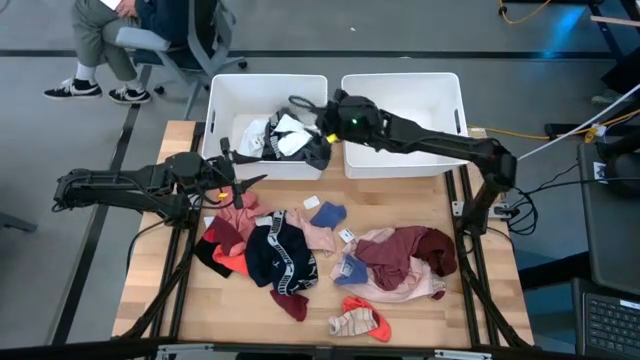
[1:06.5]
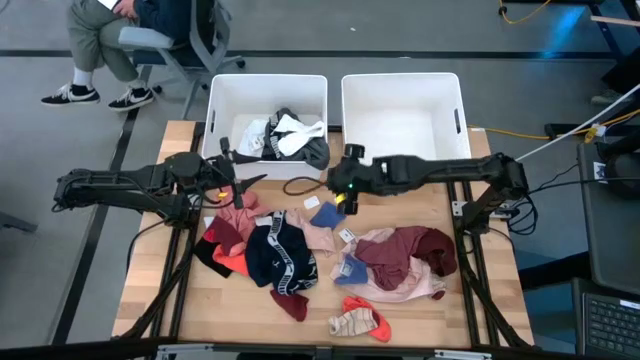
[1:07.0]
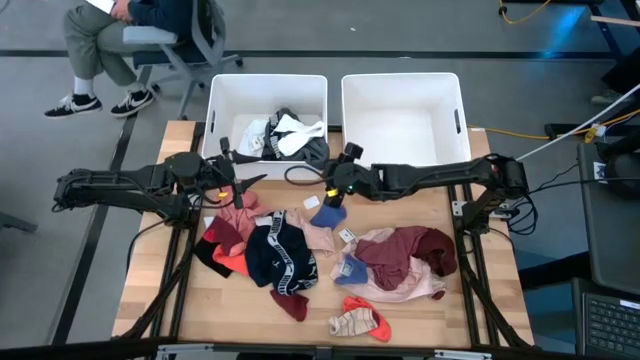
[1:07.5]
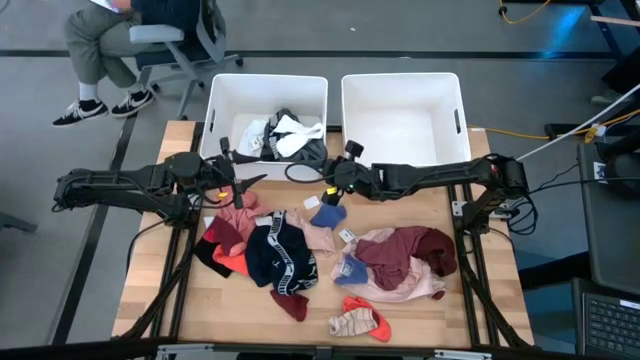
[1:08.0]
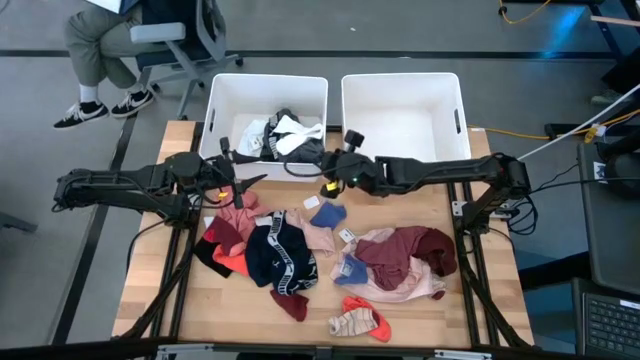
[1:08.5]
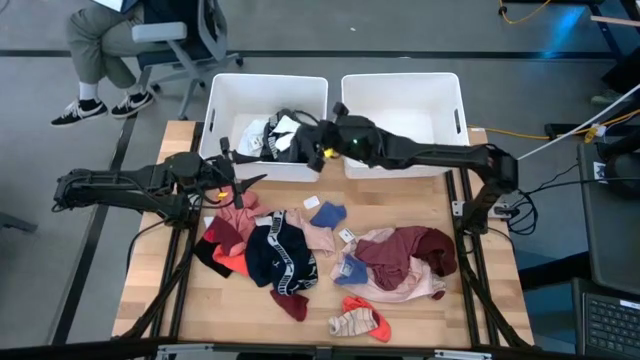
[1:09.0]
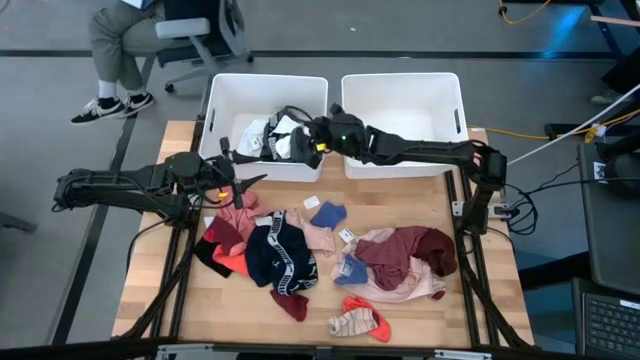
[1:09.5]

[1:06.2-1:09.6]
Task: Sort clothes
Adjust the gray boxer in the left white laundry bin

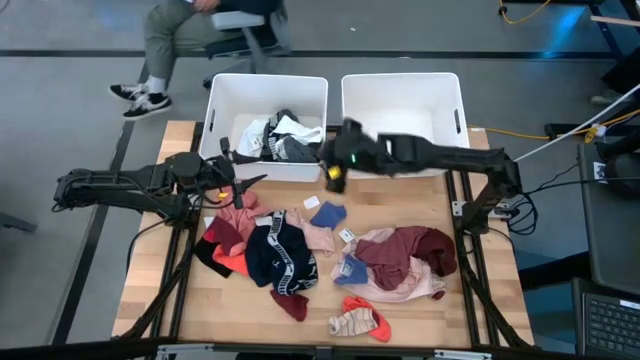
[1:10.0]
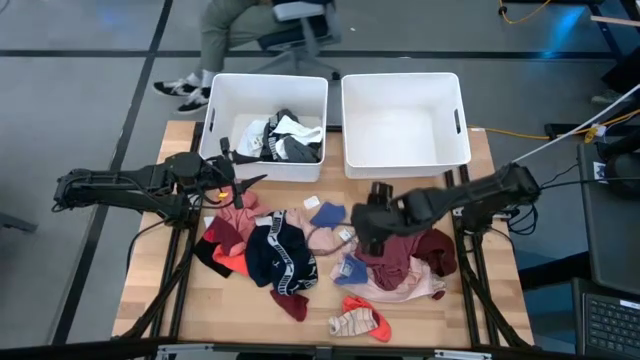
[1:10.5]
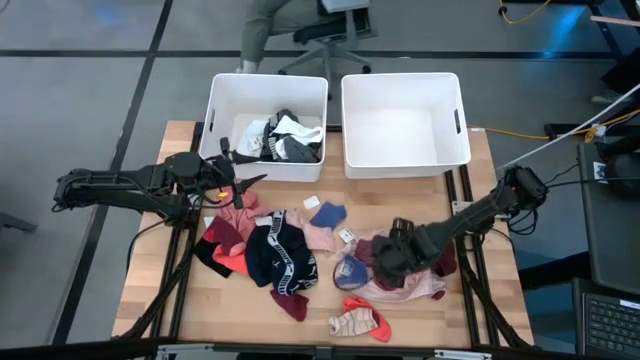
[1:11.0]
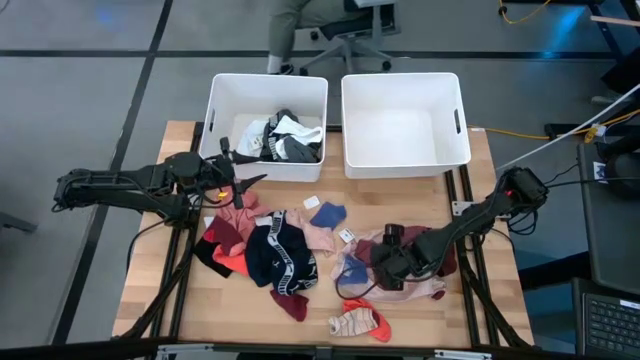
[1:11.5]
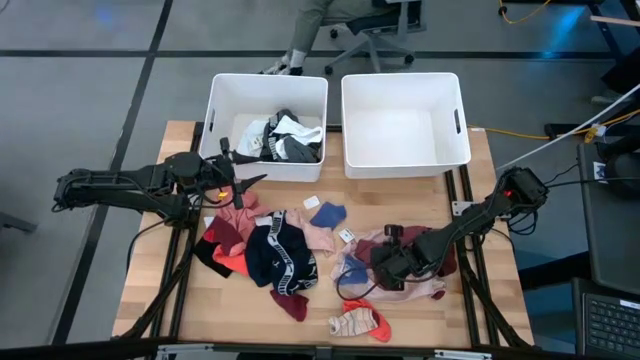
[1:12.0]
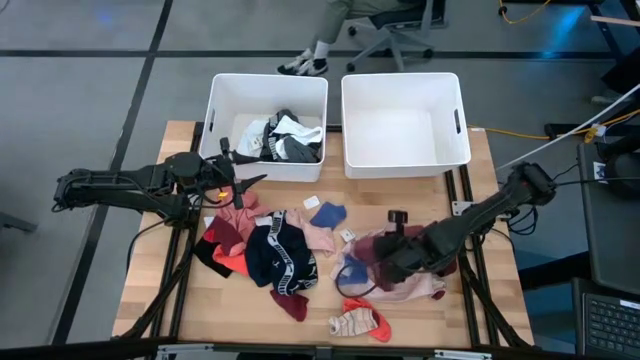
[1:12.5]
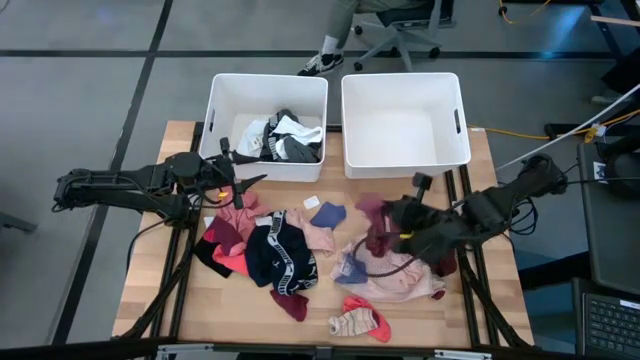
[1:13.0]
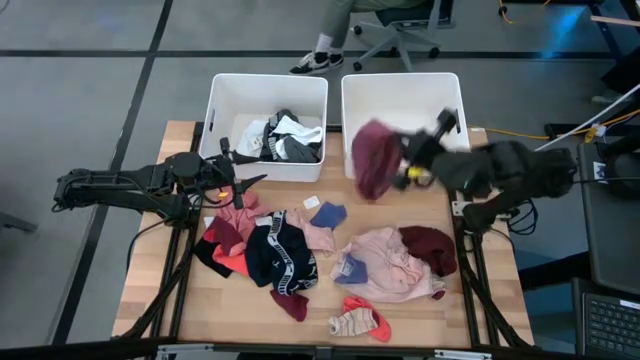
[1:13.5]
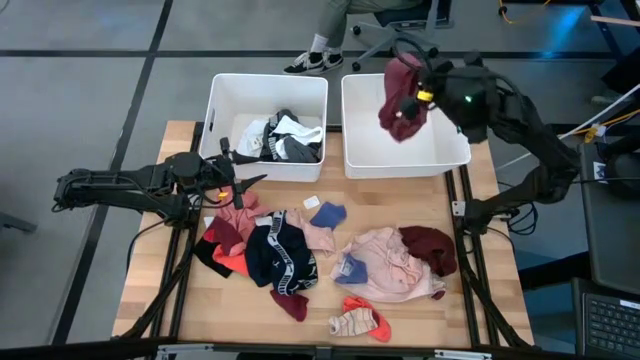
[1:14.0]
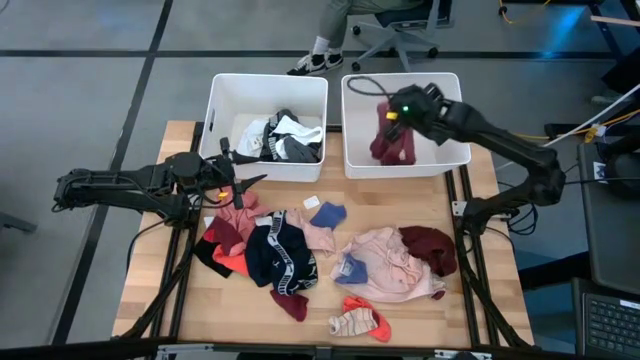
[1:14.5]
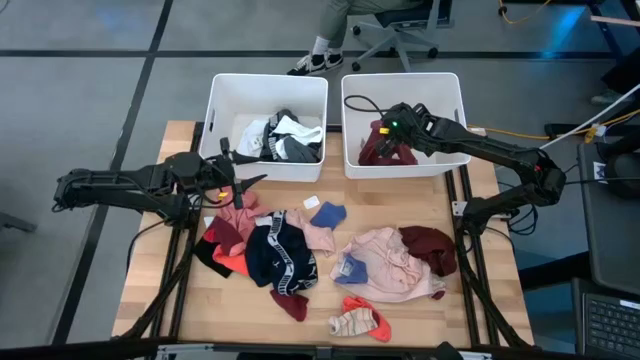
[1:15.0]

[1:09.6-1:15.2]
Put the red tube top into the right white laundry bin

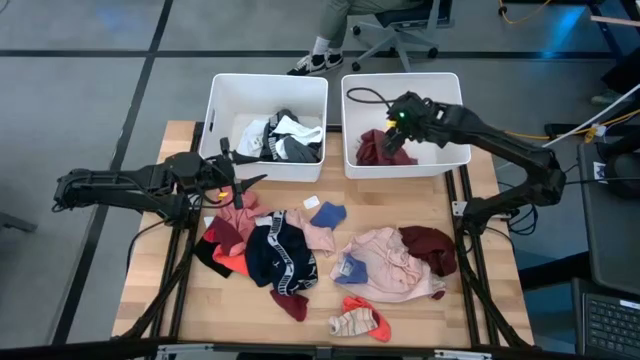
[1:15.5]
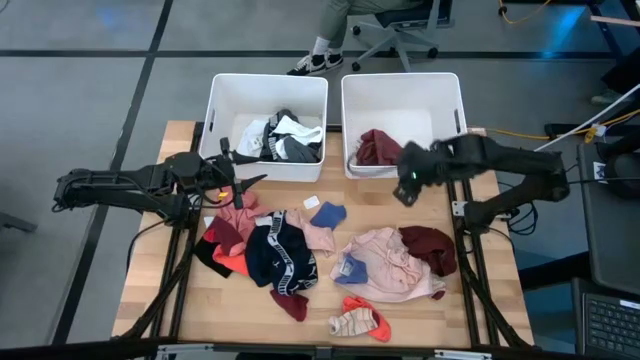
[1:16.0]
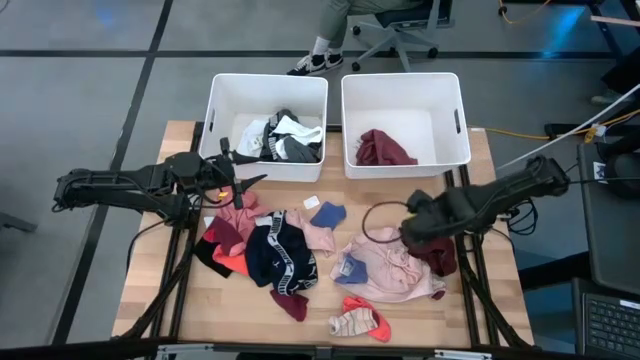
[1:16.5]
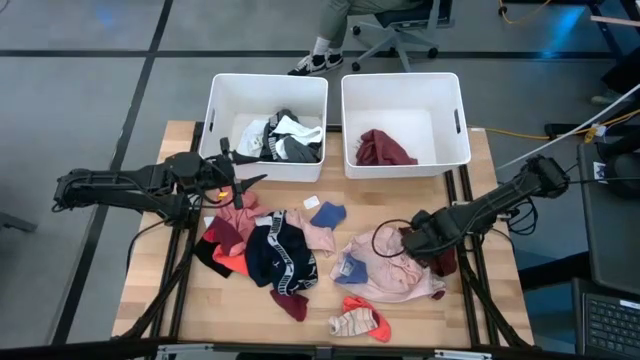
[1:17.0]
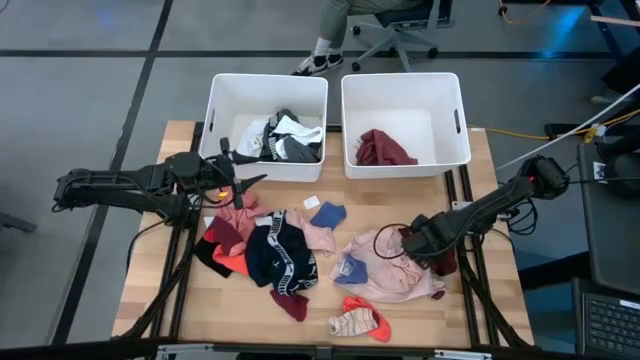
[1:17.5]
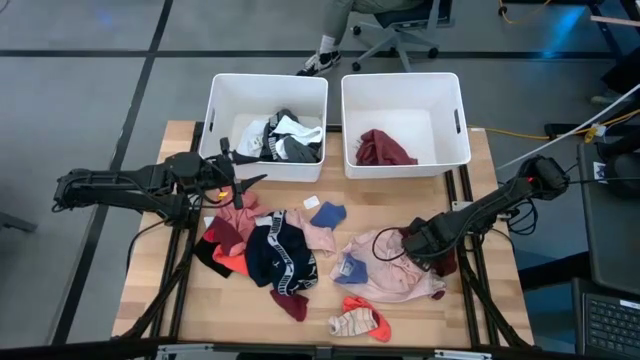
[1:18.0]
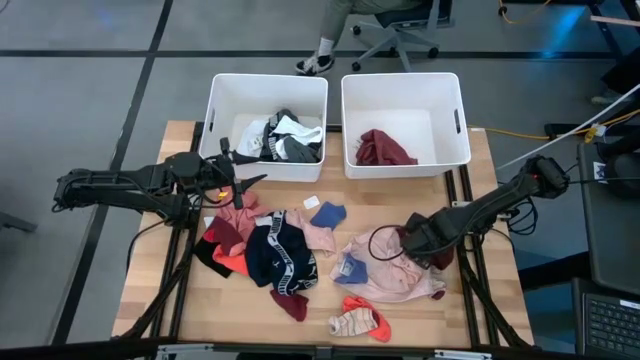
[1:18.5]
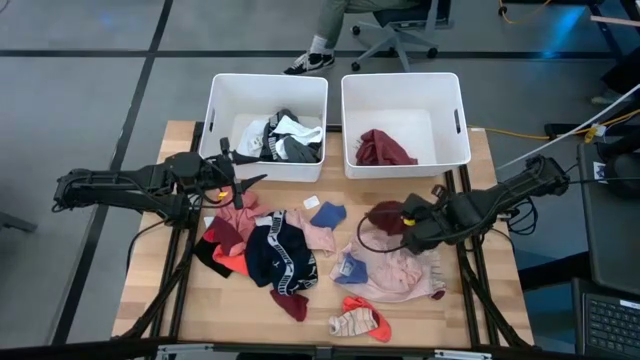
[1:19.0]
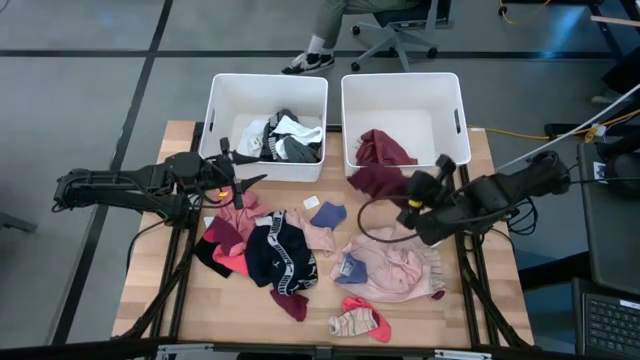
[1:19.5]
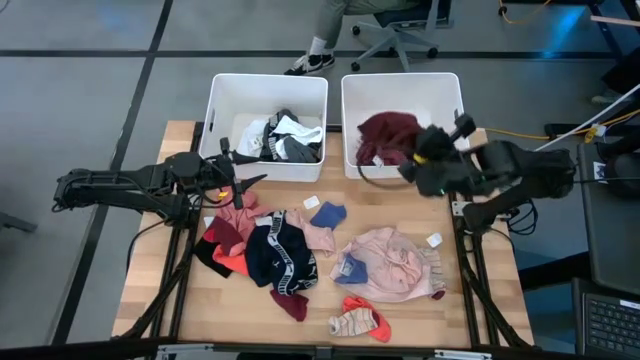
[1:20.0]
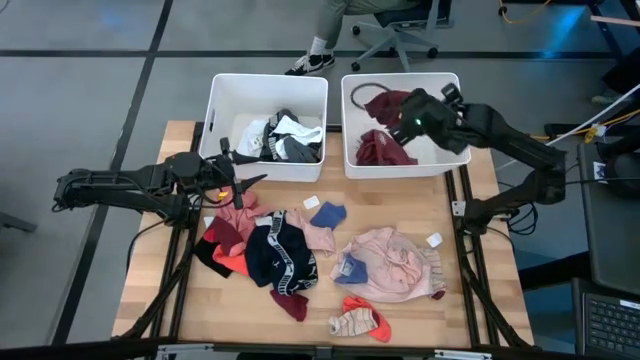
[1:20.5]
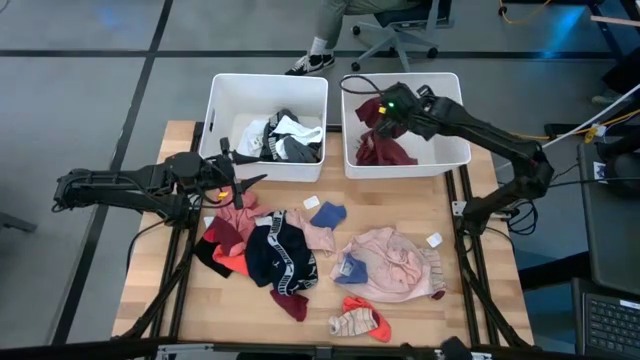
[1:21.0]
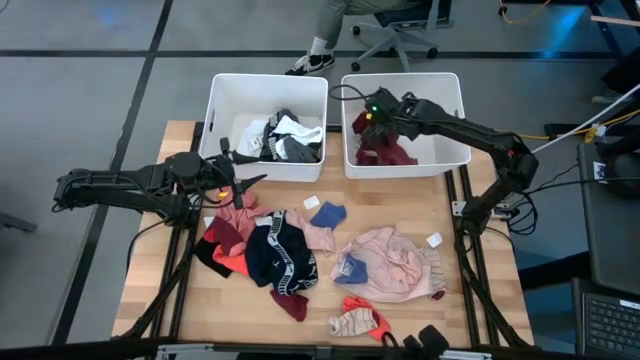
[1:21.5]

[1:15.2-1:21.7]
Put the maroon tube top into the right white laundry bin

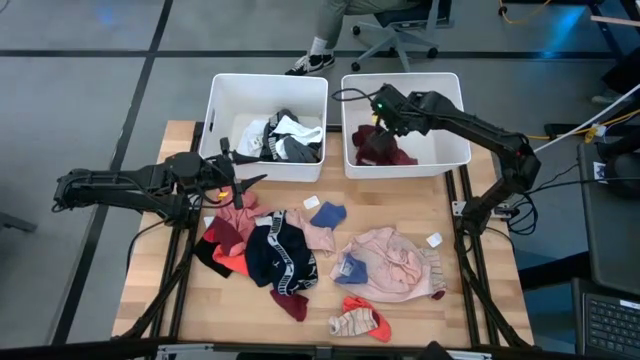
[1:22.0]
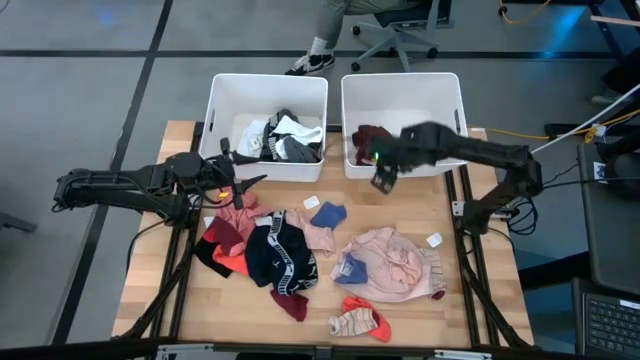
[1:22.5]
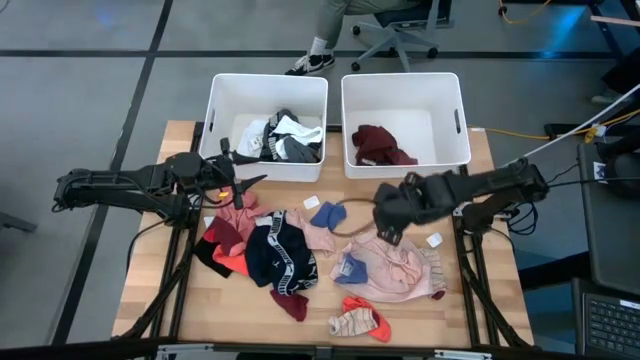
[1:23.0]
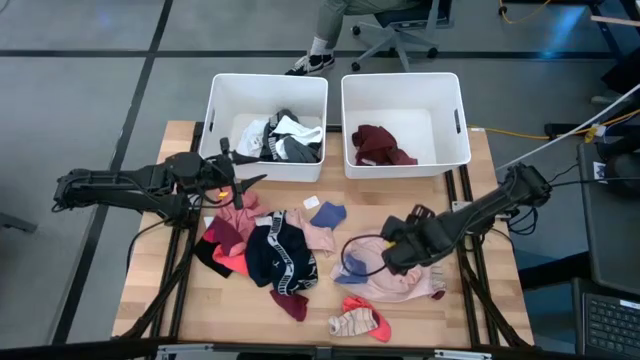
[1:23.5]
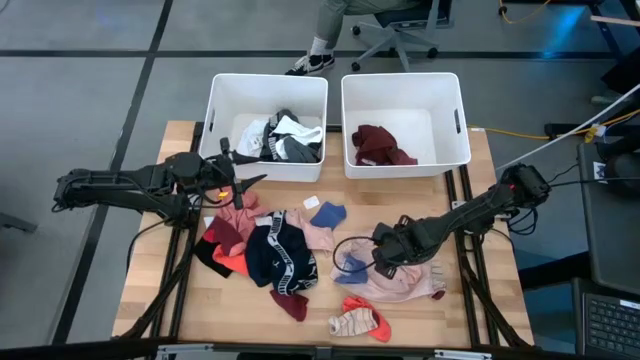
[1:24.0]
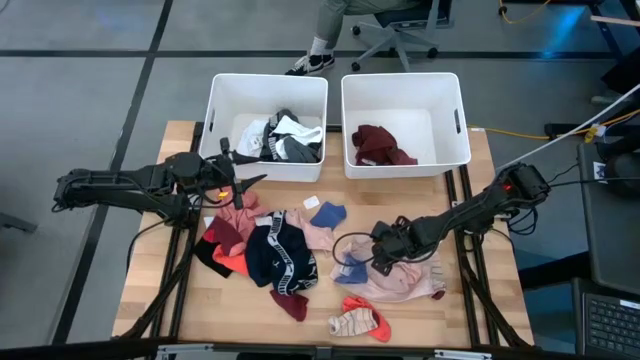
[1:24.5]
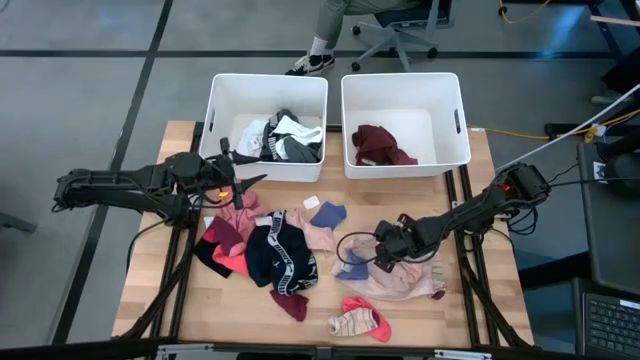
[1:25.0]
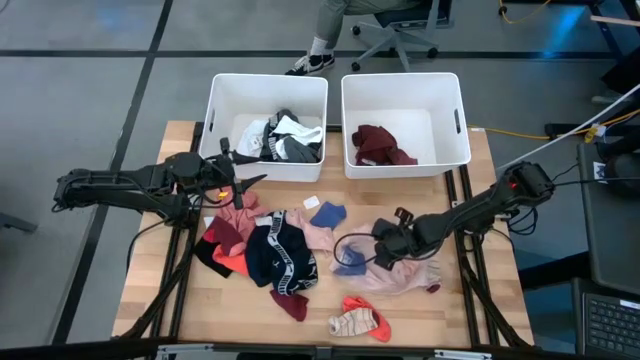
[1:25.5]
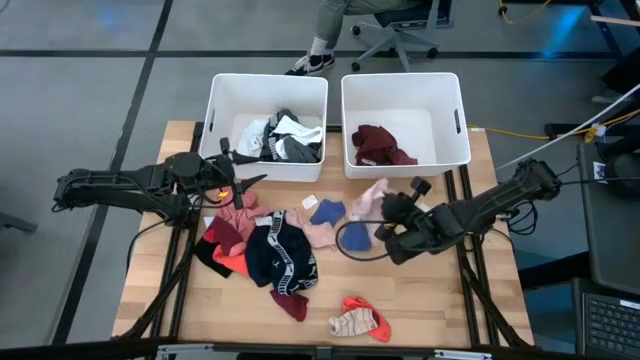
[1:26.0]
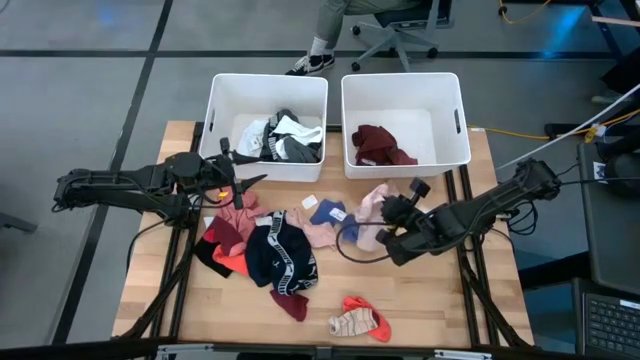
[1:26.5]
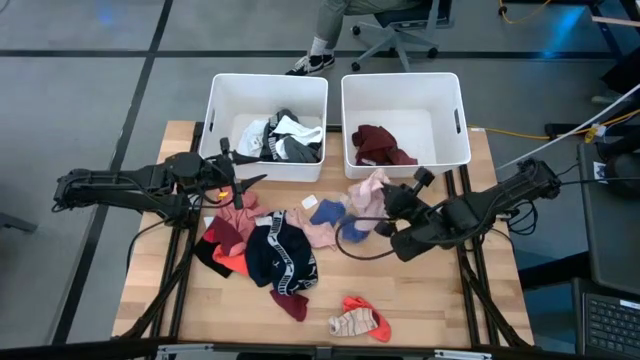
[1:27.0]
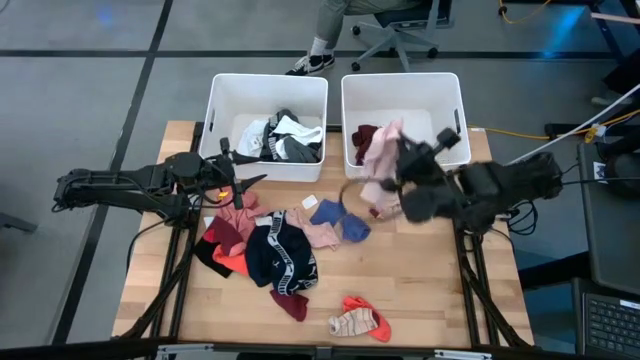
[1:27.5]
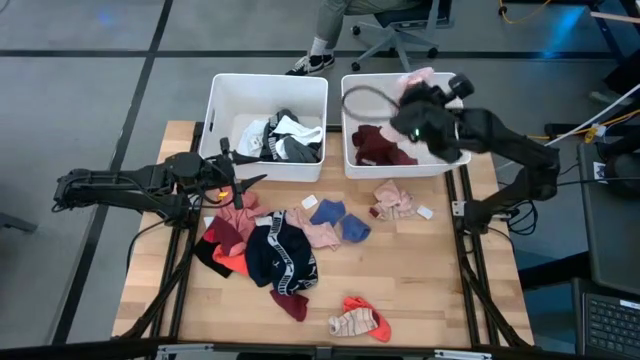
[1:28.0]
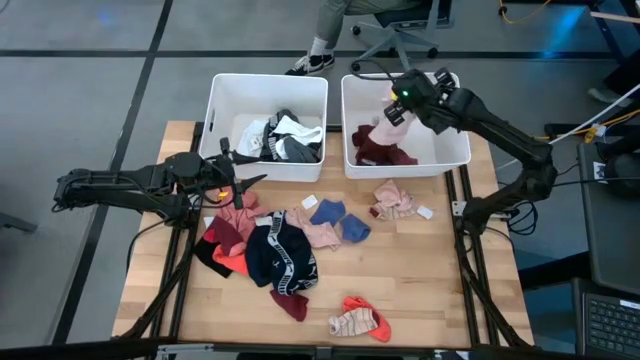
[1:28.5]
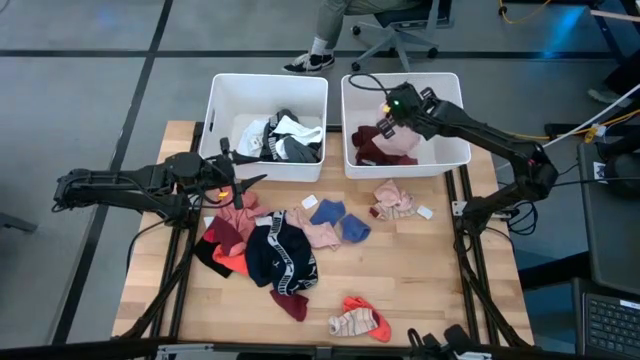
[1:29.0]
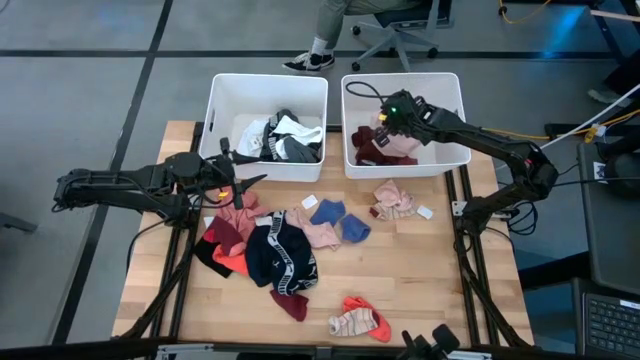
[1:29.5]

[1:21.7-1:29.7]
Put the peach underwear into the right white laundry bin
